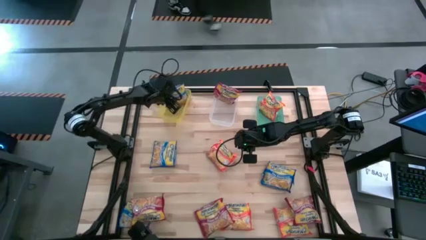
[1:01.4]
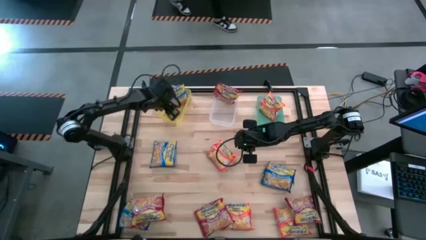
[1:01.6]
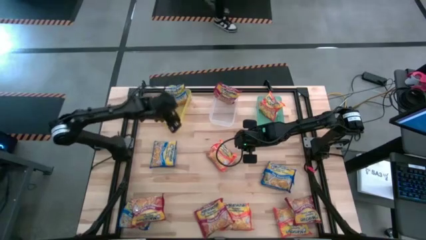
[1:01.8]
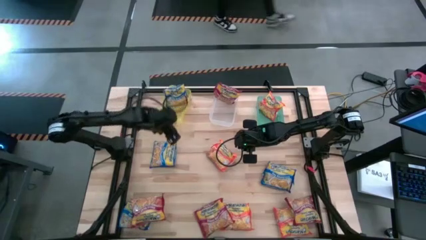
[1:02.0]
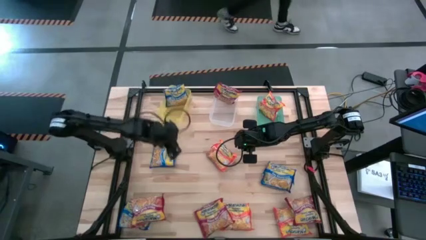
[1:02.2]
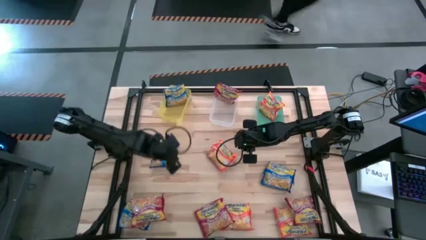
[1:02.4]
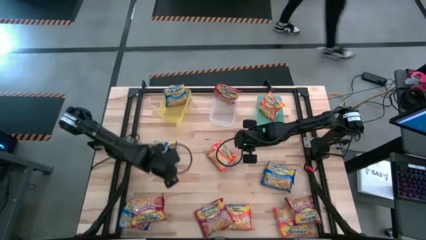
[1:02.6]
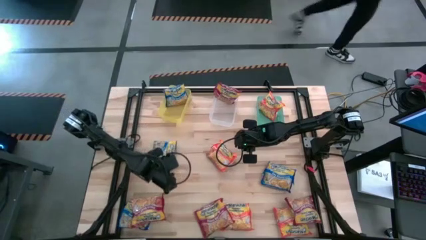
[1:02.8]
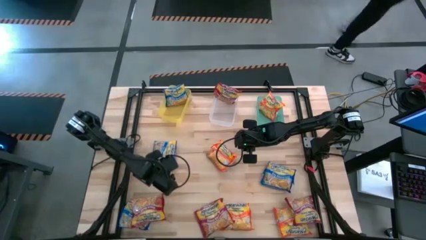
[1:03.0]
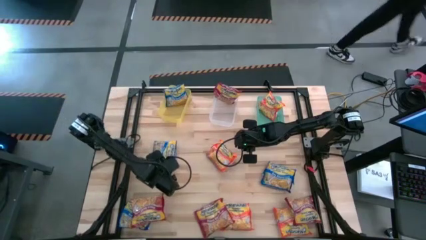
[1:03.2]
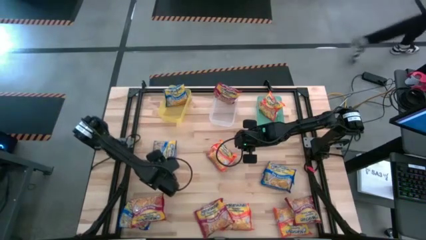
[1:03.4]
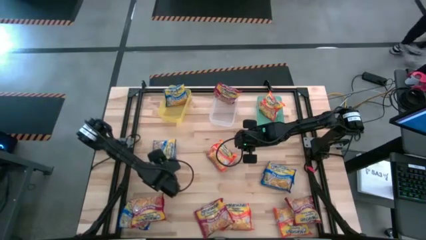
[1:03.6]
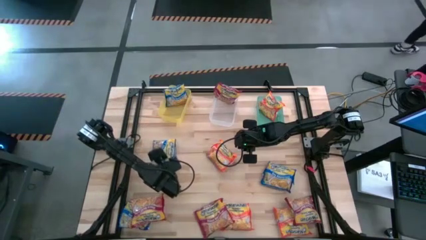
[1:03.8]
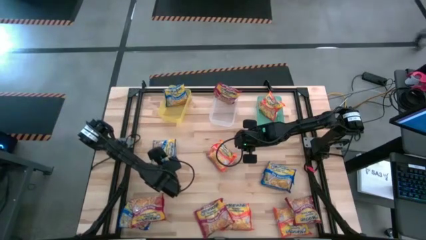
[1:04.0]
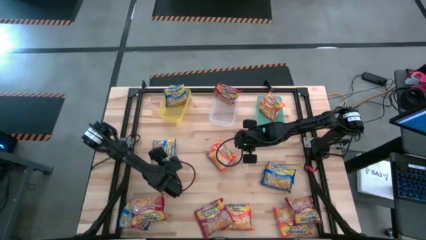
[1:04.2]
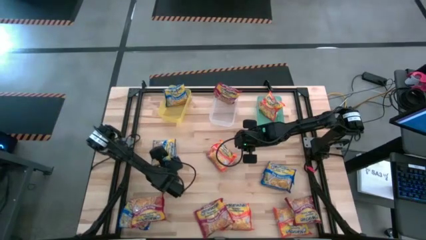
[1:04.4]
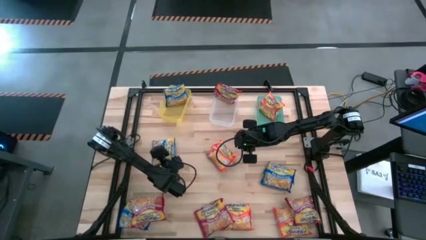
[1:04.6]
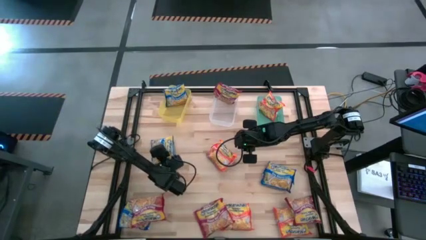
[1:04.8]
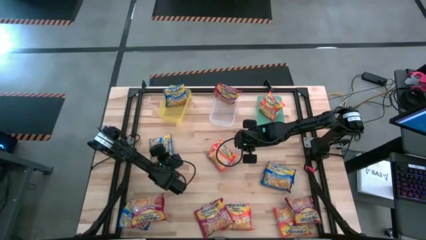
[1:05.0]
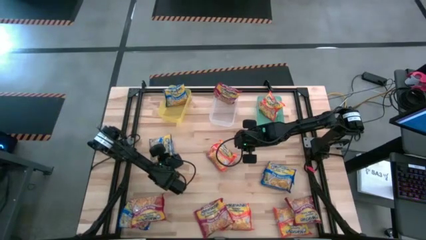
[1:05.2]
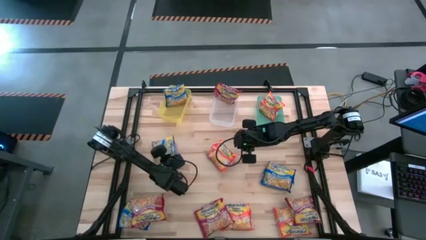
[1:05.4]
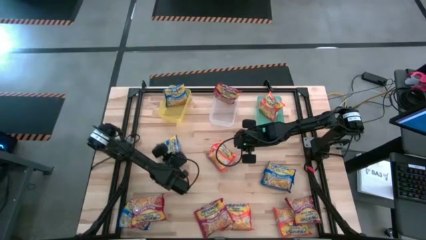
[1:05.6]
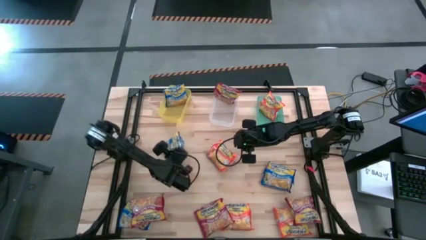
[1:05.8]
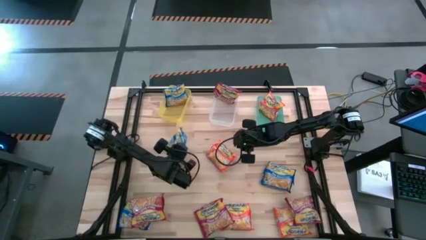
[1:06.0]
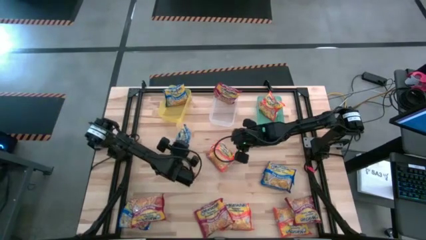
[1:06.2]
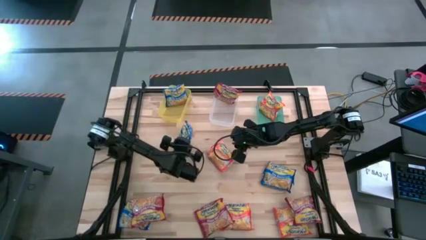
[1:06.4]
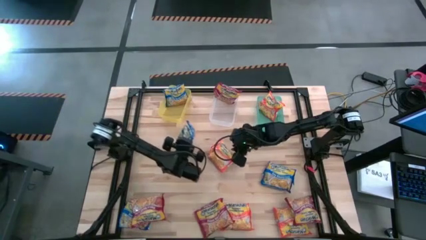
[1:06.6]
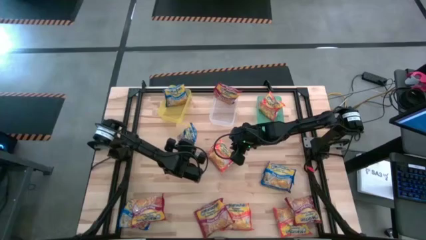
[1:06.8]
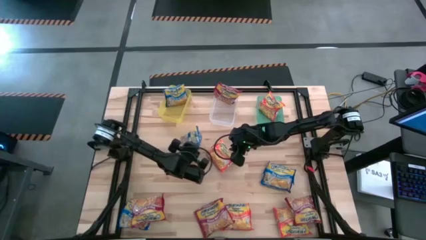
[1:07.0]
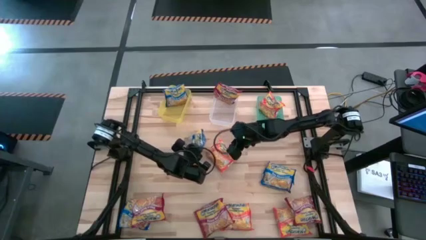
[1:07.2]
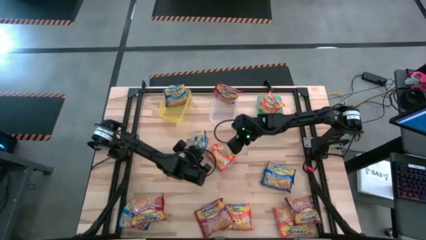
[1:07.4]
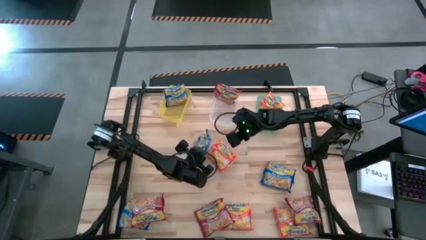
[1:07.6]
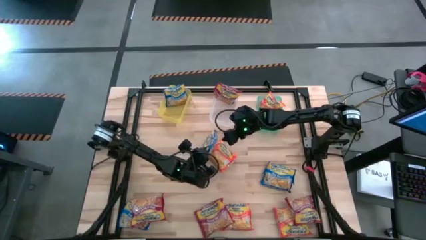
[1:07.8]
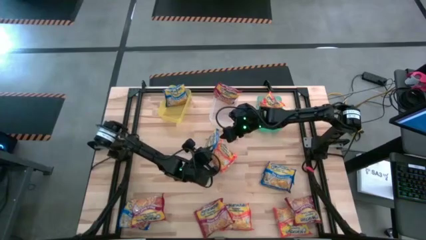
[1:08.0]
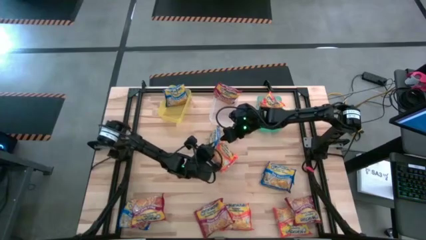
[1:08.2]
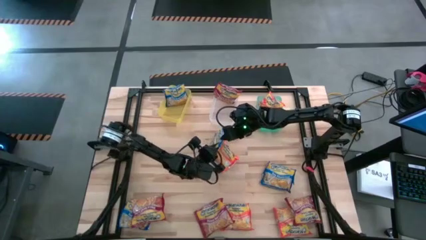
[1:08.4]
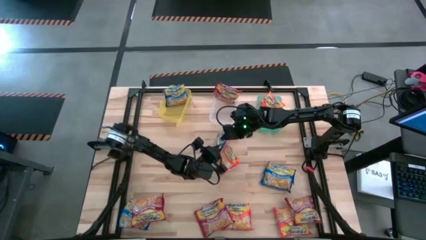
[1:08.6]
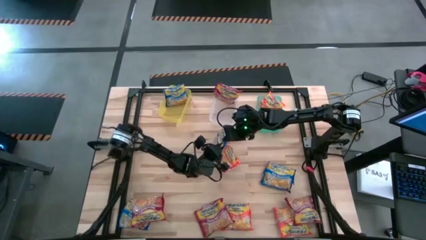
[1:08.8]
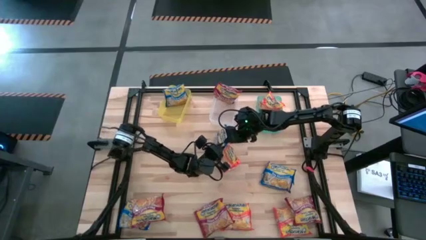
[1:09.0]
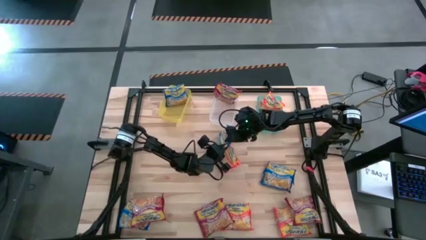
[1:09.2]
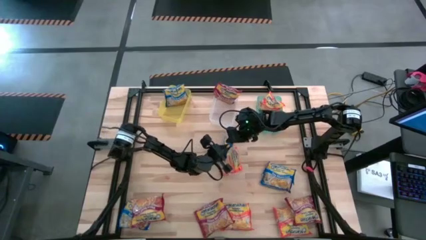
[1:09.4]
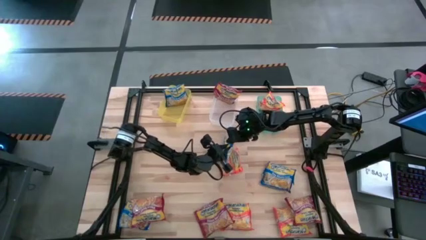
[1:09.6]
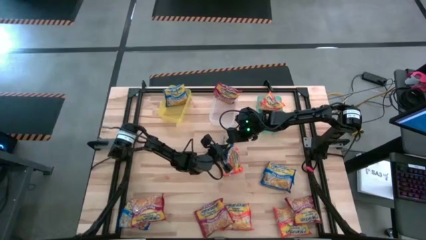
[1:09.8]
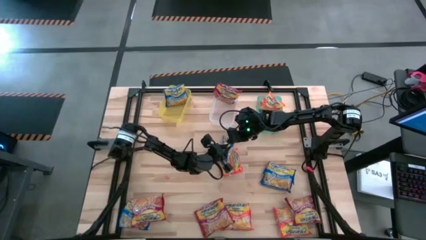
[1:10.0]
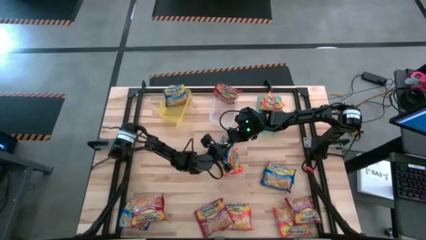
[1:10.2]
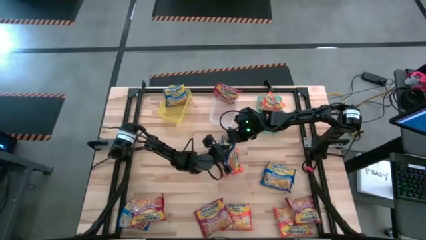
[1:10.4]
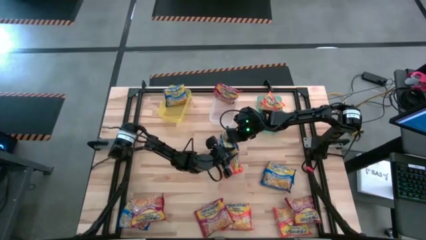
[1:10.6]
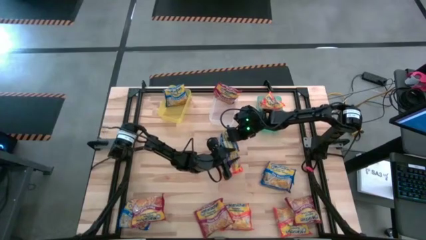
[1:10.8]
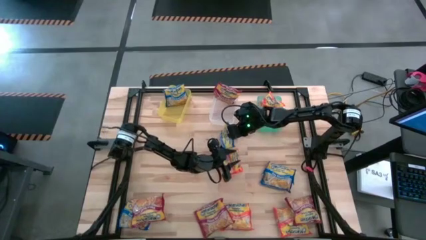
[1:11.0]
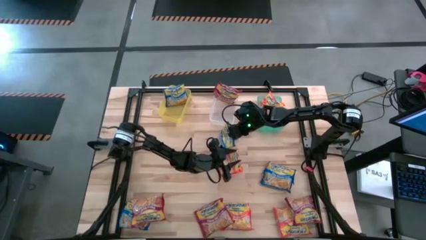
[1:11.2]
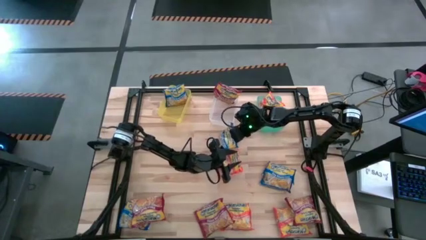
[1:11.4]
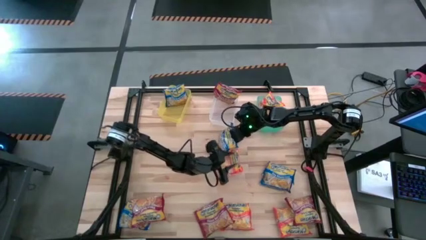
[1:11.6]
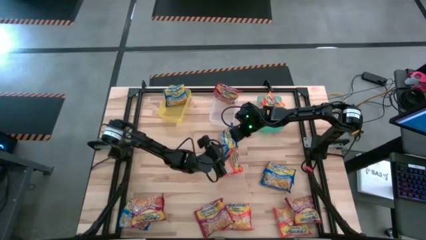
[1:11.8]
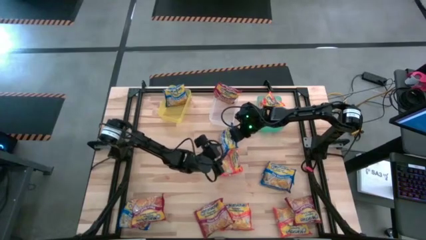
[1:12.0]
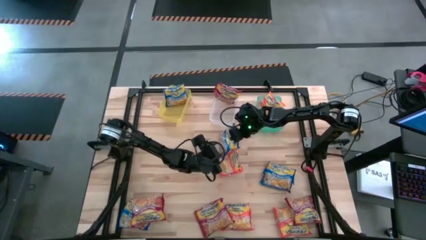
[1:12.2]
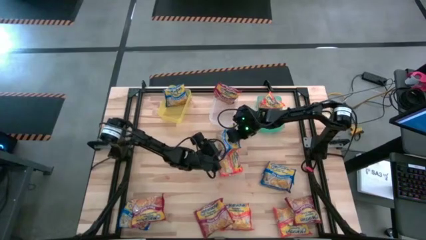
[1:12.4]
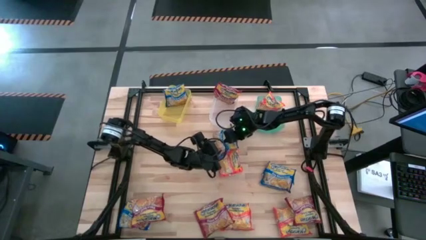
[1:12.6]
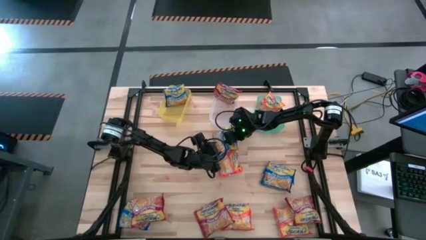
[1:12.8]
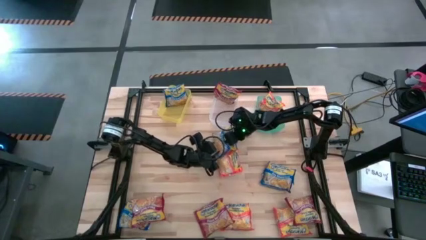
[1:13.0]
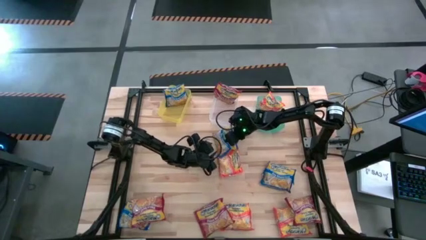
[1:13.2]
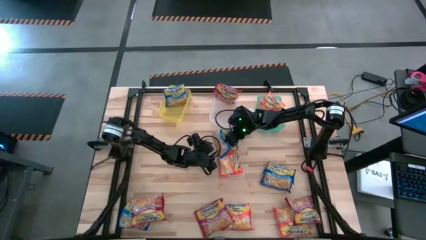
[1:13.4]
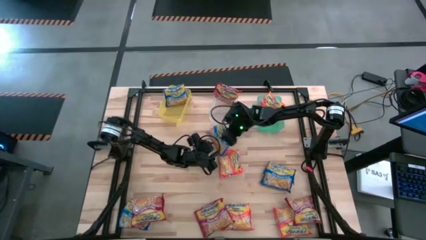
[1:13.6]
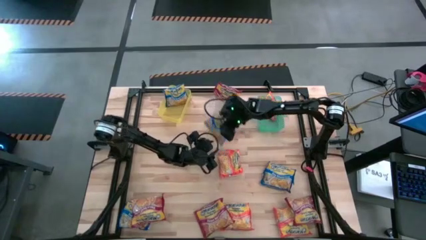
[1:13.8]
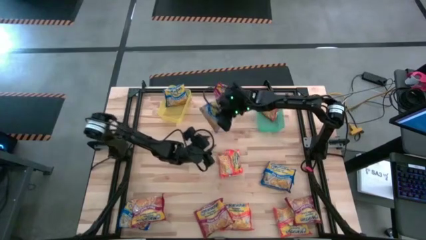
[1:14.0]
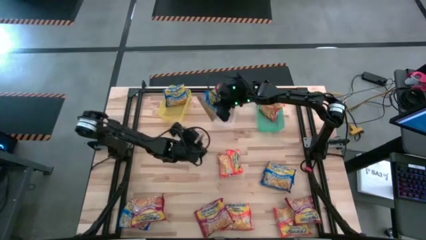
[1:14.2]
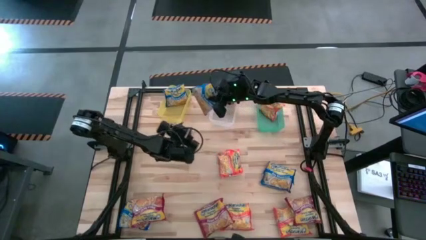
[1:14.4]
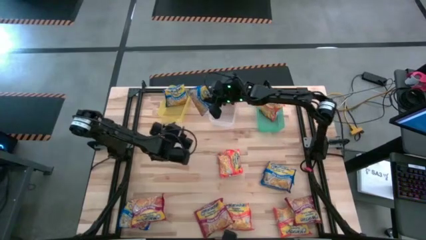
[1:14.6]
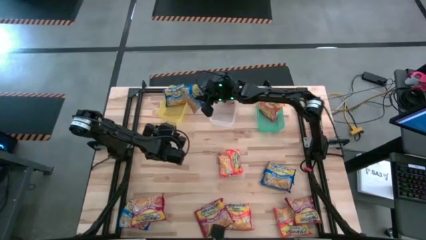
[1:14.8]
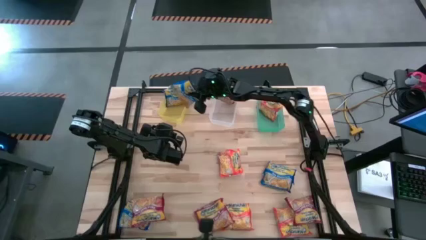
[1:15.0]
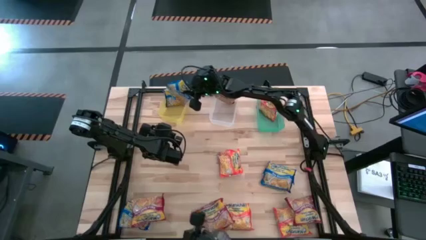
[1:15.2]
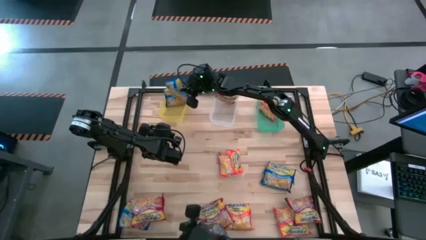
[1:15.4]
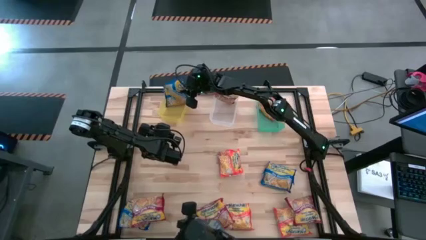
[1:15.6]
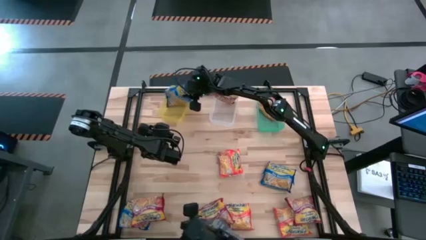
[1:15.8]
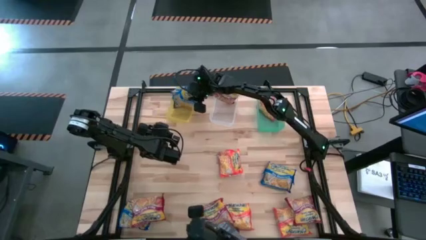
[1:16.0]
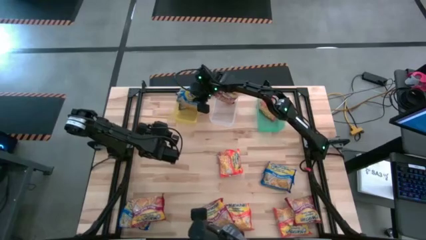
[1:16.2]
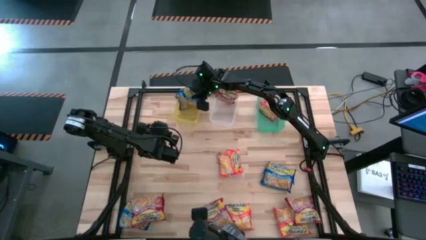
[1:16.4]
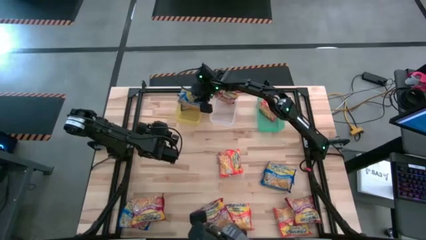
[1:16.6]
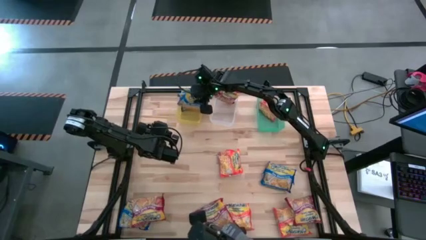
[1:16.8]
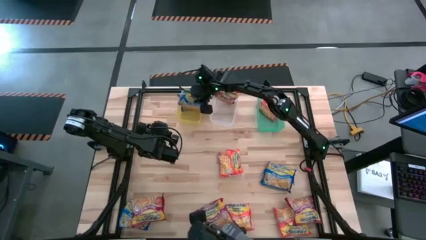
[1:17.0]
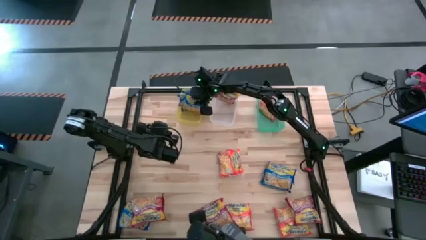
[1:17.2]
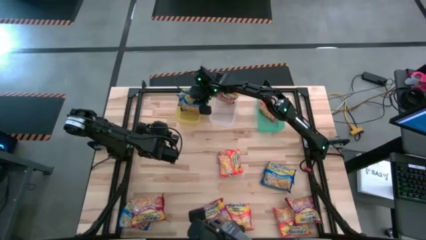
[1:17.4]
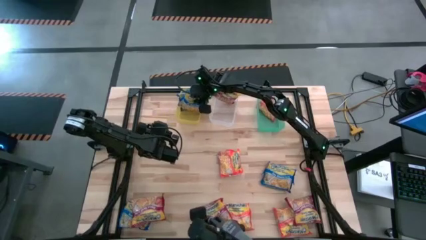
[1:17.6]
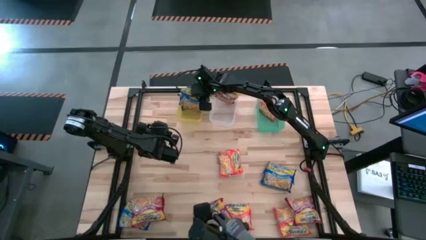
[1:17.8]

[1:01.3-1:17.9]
Task: Sort Maruchan noodles
Put the top left blue noodle into the yellow bin
